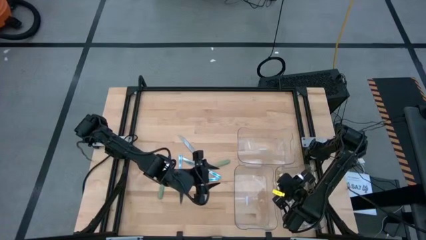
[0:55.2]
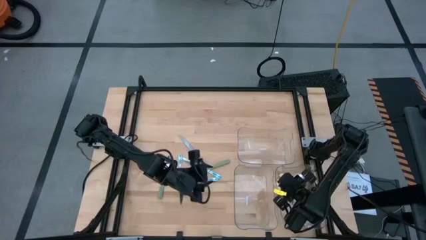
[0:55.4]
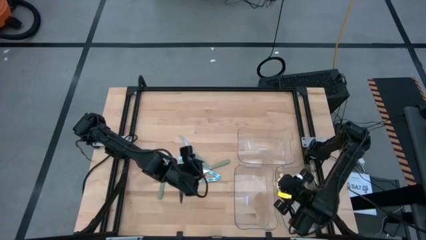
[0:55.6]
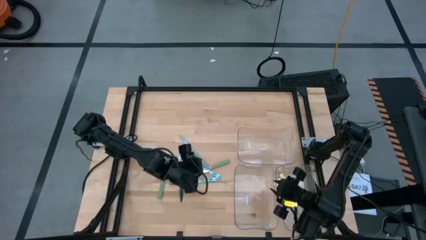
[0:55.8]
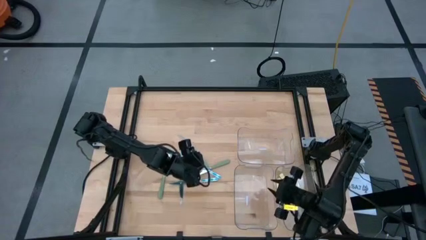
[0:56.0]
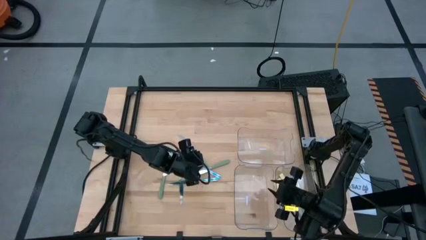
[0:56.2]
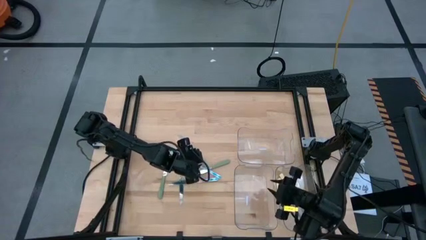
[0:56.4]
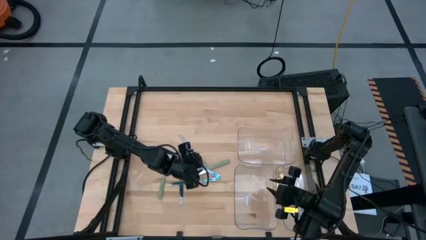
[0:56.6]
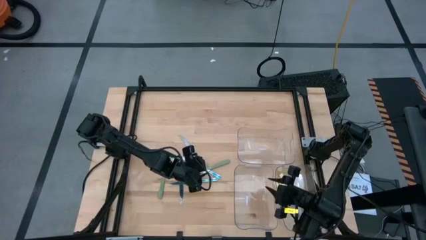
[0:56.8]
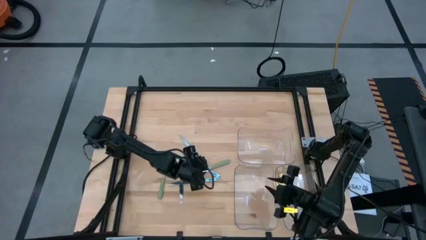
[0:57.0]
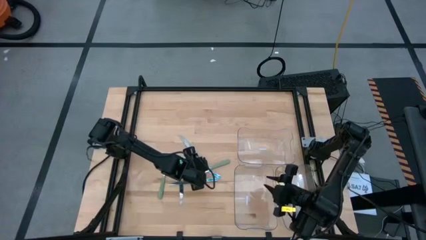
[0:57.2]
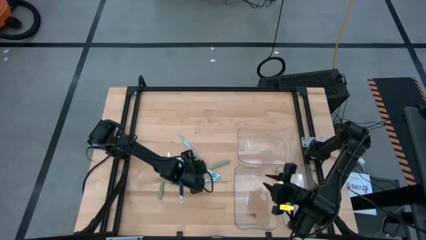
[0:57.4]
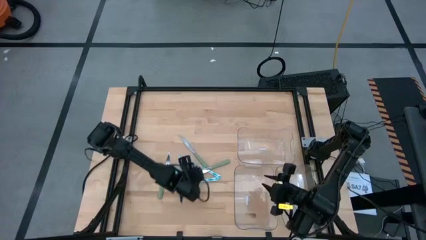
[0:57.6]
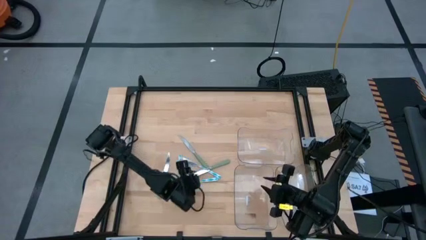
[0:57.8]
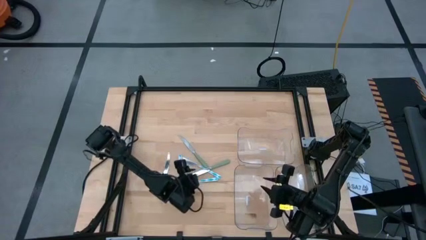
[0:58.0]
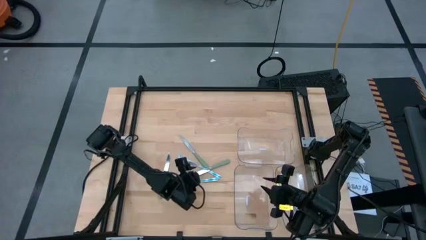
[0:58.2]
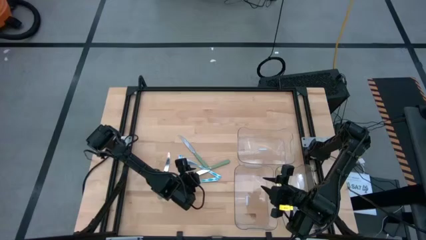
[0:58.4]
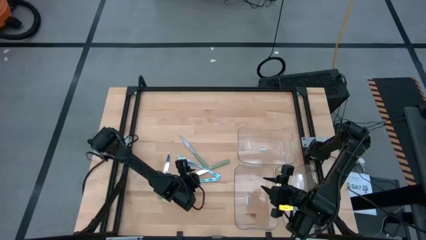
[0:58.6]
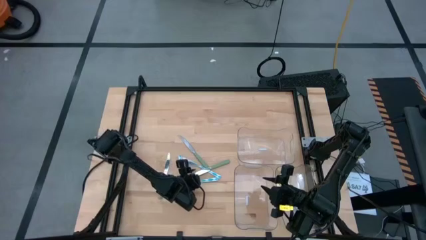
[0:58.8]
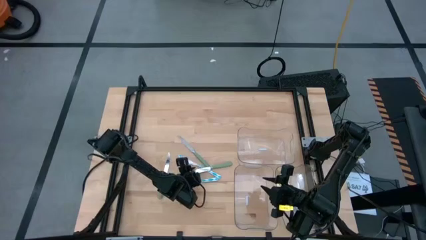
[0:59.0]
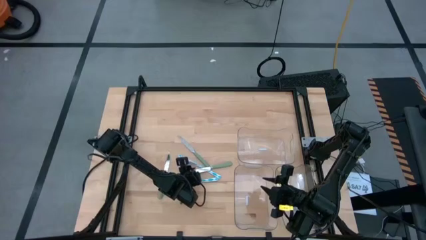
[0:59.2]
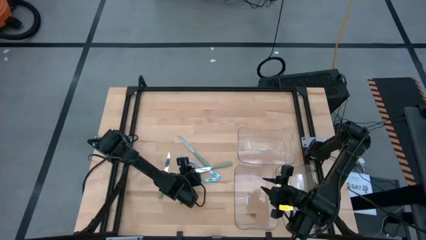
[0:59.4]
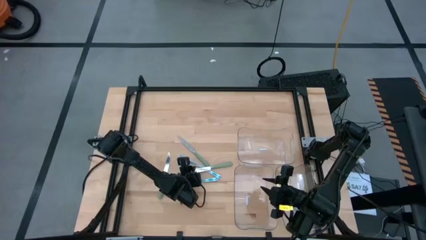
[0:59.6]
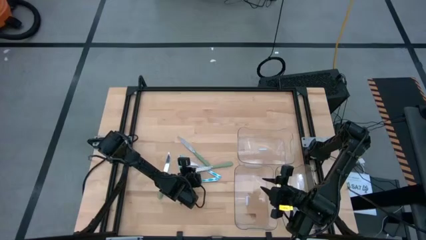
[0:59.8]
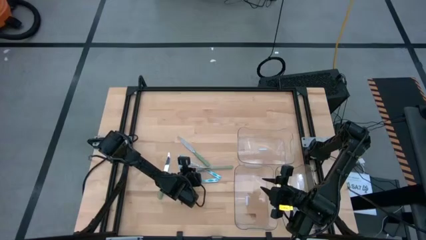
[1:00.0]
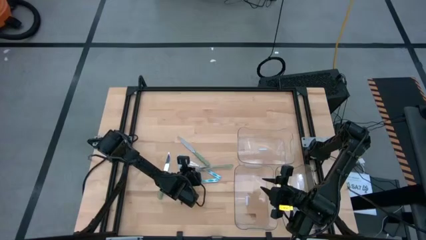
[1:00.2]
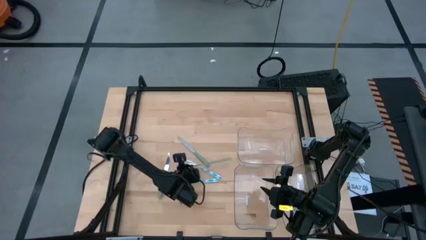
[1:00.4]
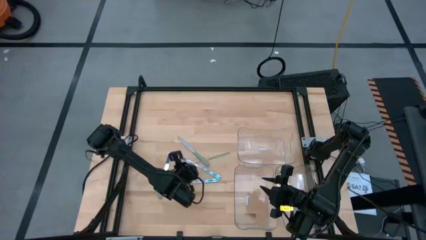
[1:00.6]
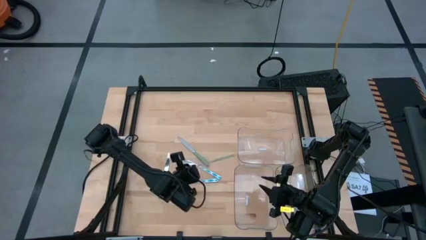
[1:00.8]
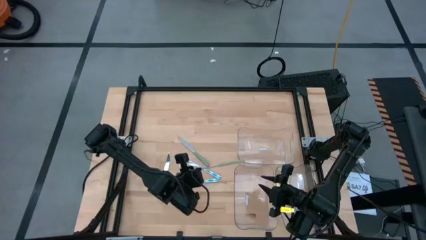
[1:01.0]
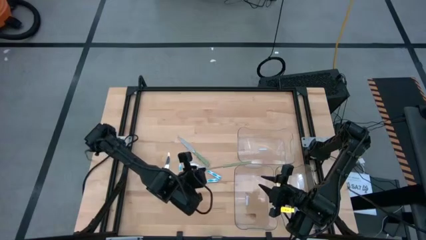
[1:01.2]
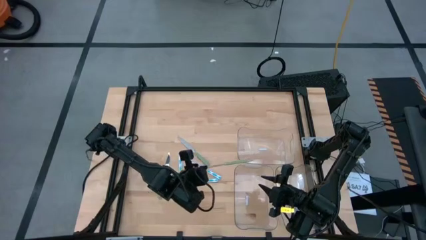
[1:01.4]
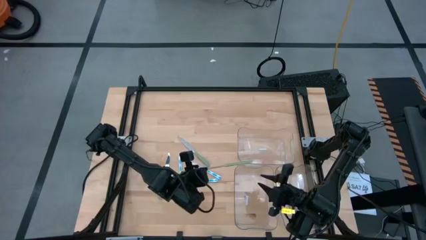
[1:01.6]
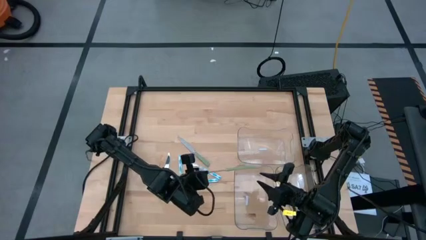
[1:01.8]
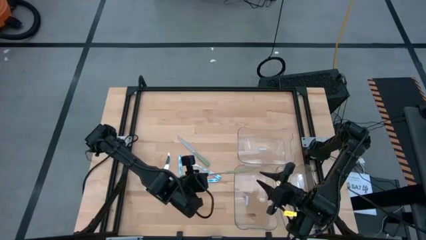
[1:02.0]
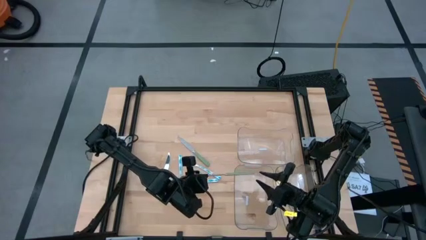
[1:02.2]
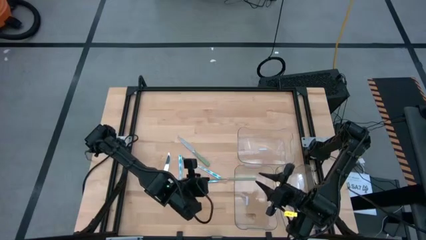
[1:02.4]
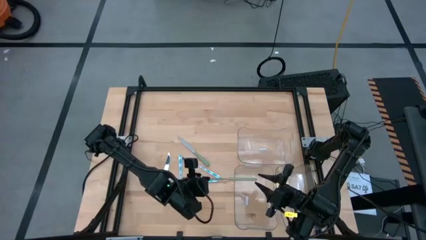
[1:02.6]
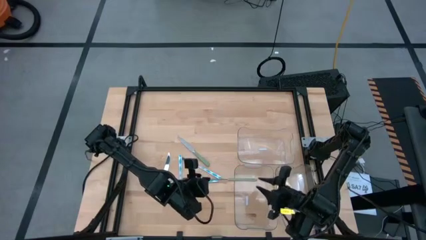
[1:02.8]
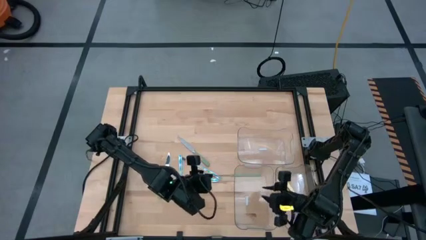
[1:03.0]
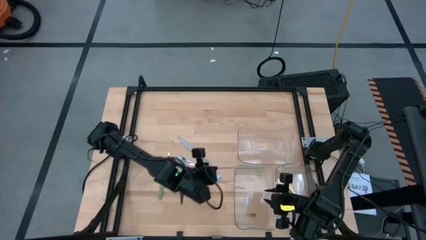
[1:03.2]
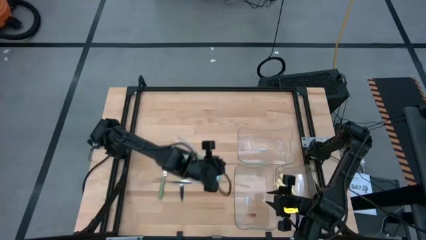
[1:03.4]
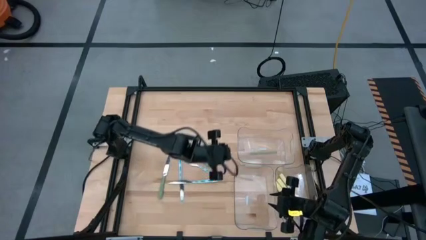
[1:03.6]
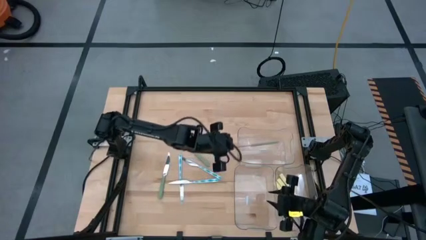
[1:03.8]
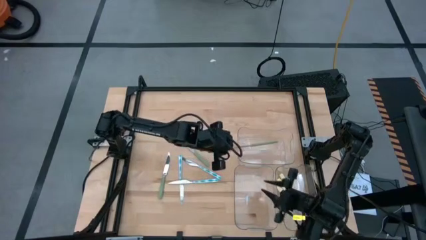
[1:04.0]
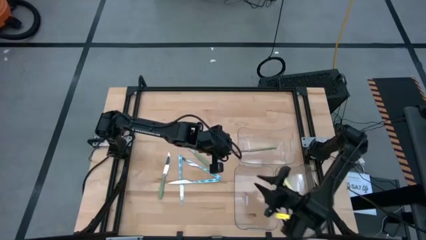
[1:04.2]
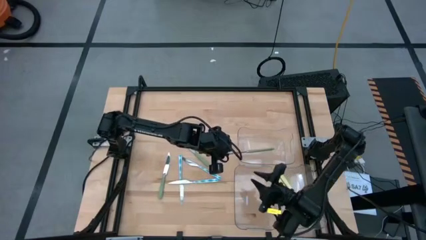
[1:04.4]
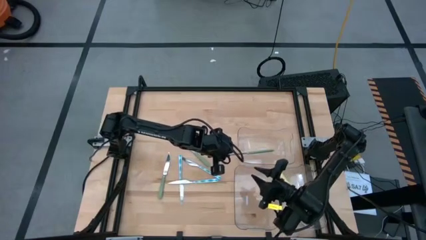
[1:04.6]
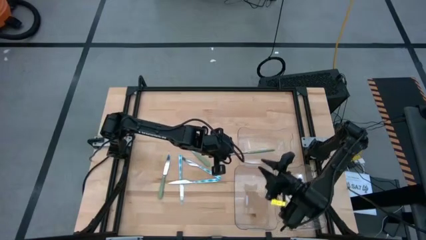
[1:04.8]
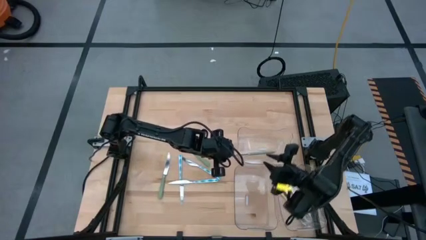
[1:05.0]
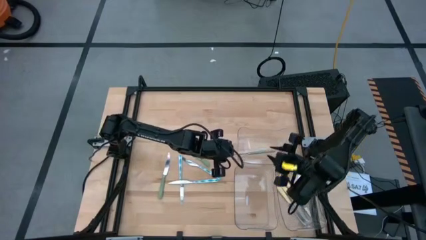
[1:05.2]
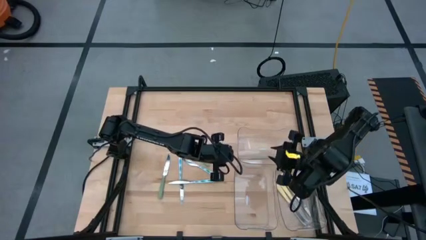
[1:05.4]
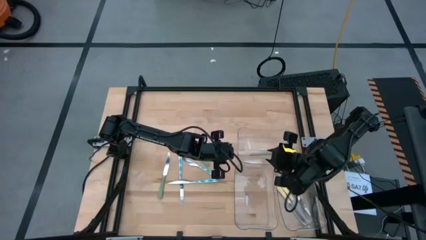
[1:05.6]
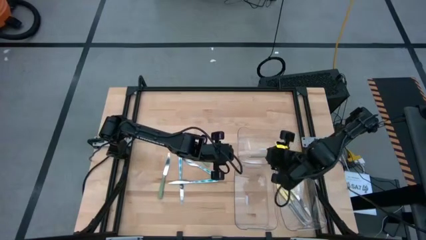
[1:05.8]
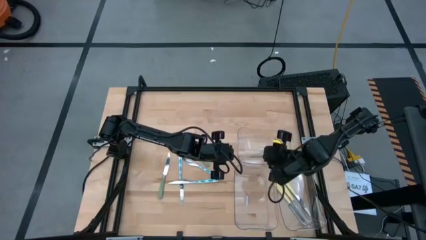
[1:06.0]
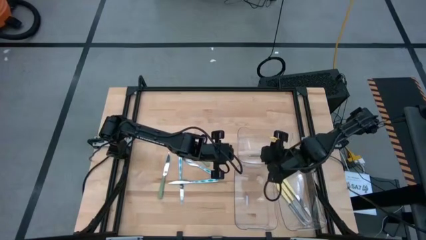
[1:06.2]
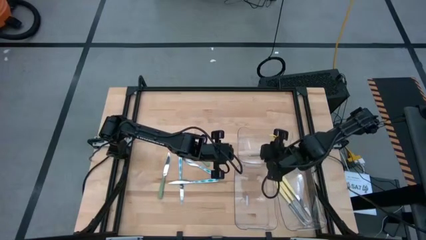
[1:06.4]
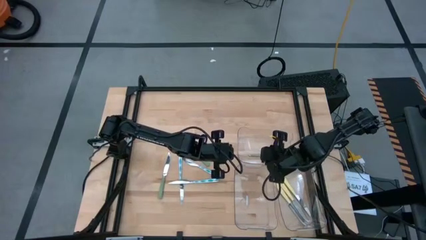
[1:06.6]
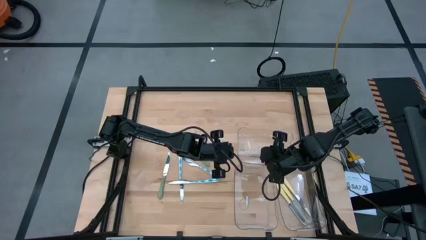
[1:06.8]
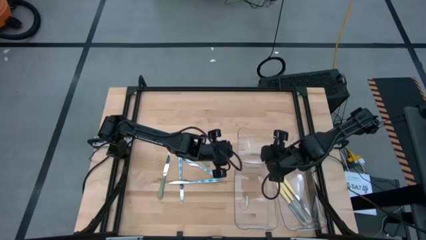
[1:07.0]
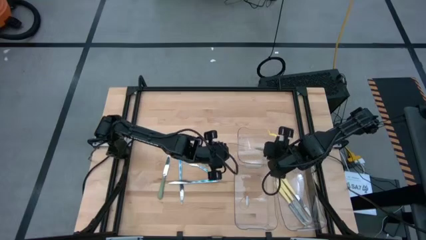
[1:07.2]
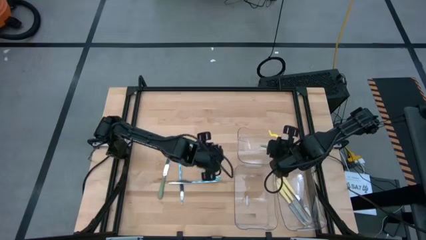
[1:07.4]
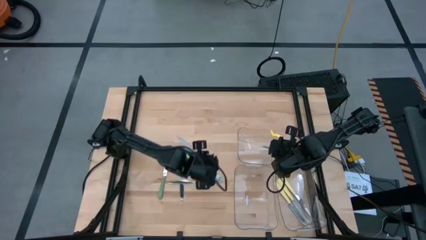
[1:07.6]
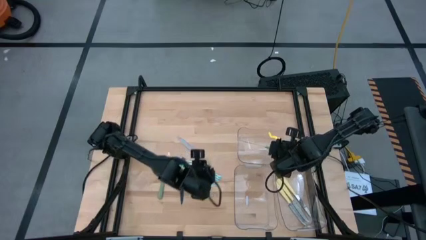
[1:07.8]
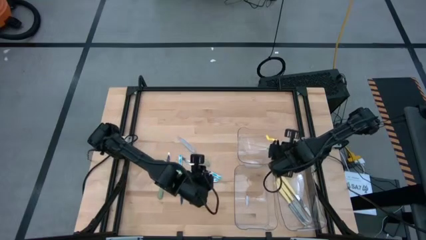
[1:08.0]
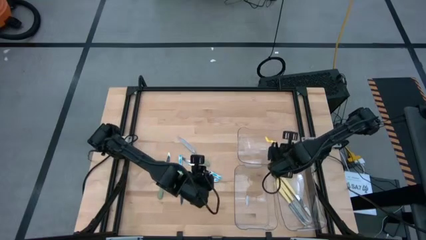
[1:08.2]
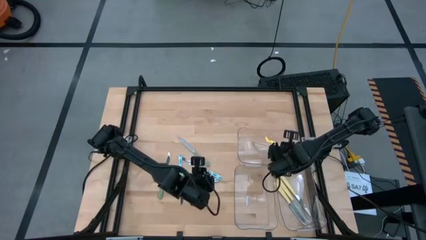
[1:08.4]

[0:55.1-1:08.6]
Task: Sort silverware by color (type)
Put the green knife into the top transparent bin

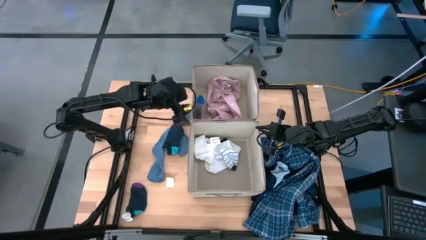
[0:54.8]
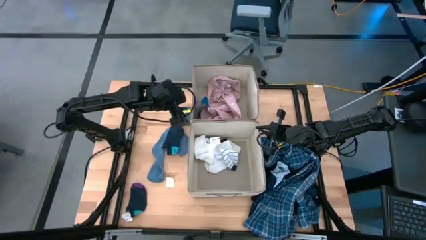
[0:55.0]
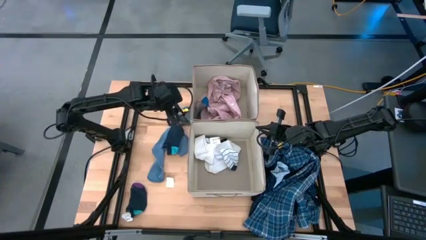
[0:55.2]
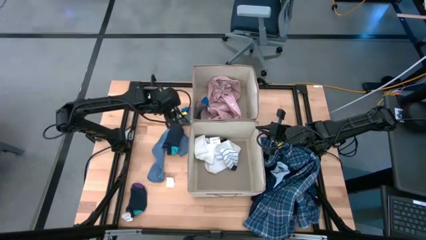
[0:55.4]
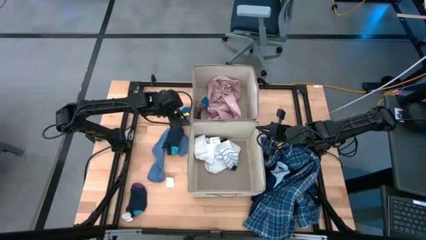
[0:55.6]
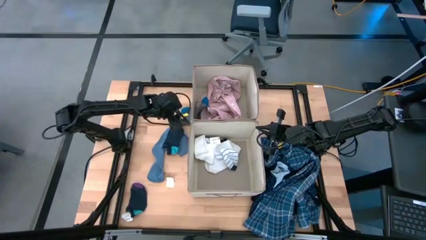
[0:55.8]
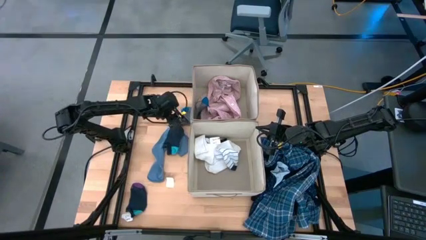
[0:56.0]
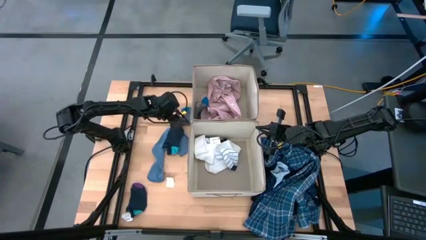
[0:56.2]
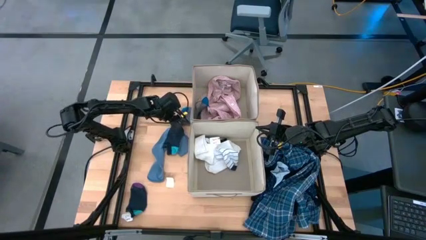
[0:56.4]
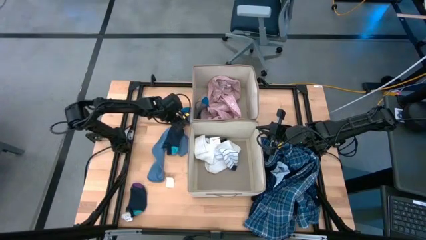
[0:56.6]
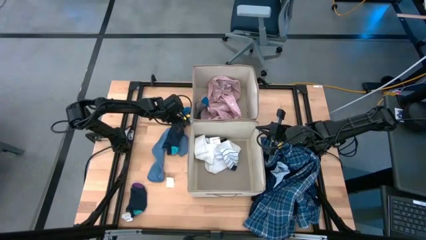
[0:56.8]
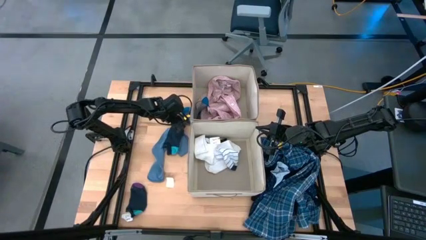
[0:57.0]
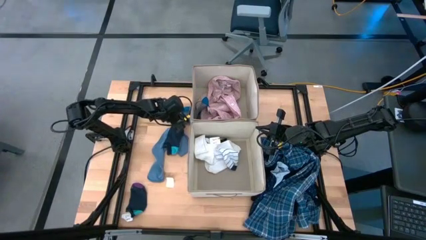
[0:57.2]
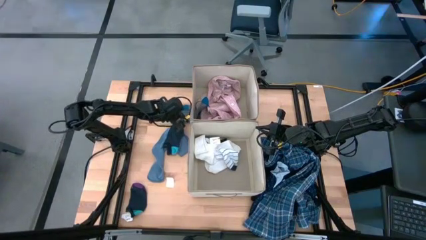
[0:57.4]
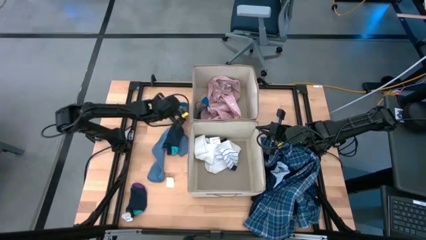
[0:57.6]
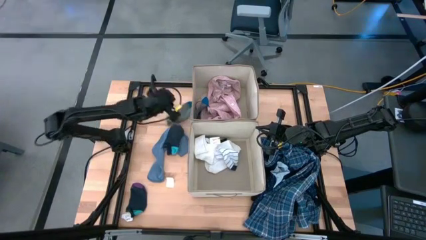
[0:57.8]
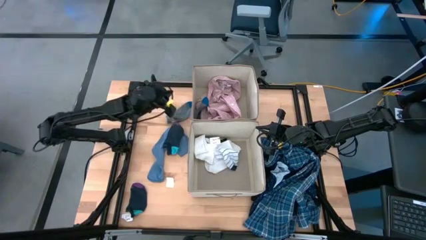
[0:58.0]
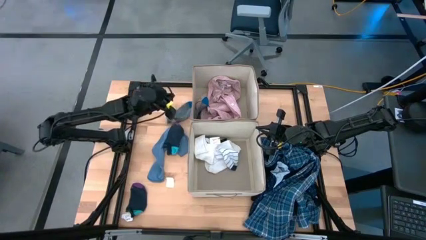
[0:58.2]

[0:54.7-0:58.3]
Task: Sort clothes
Put the gray sock into the top laundry organizer
